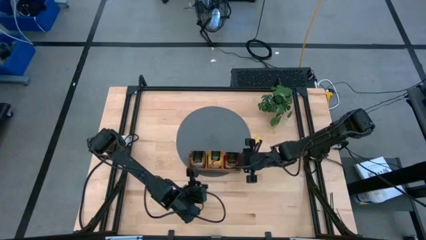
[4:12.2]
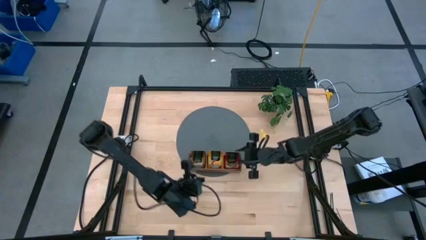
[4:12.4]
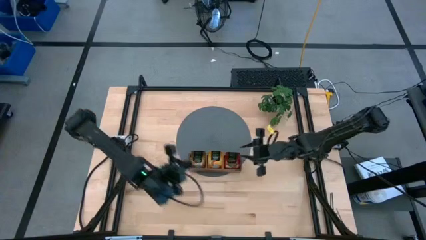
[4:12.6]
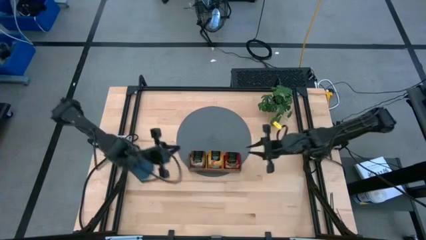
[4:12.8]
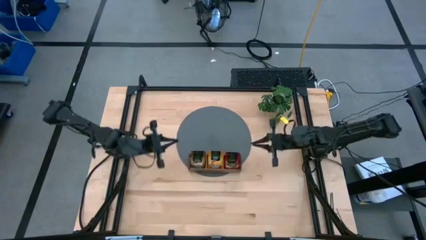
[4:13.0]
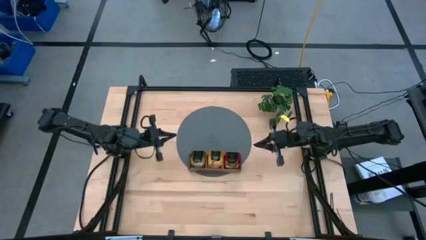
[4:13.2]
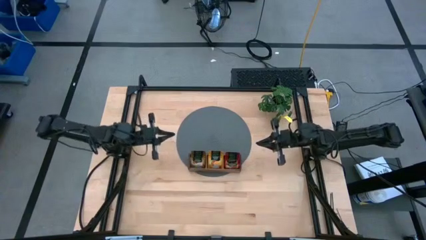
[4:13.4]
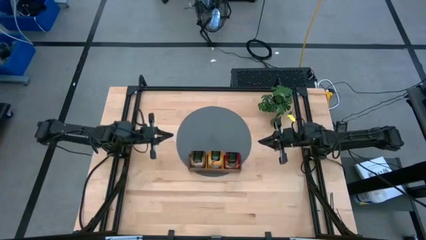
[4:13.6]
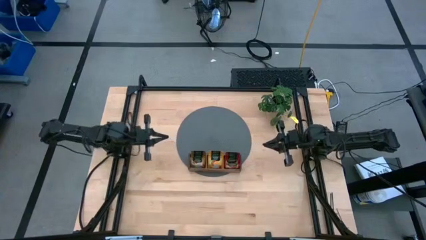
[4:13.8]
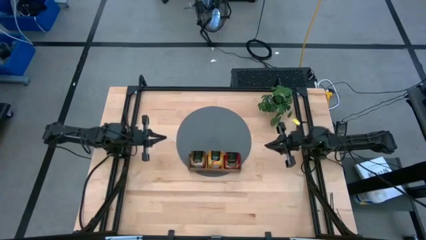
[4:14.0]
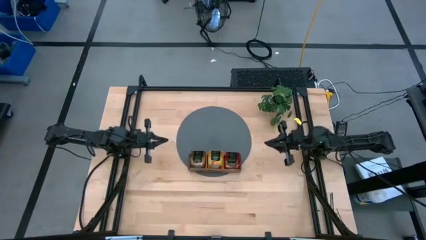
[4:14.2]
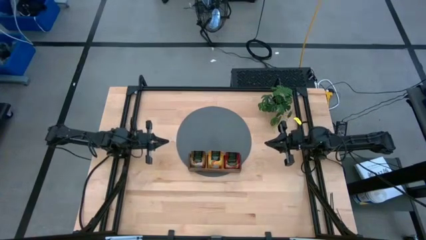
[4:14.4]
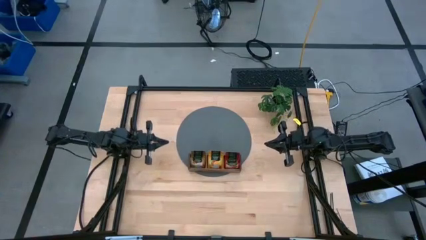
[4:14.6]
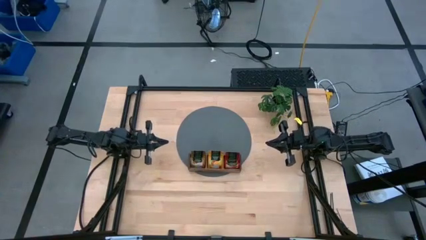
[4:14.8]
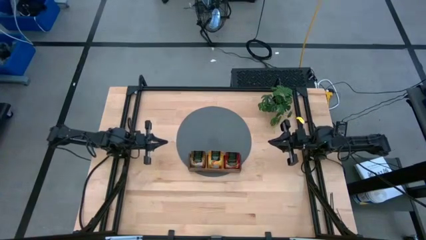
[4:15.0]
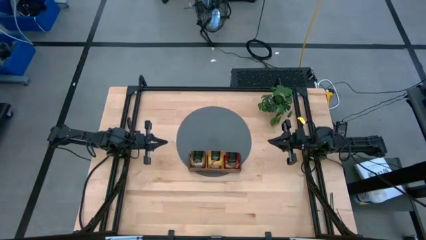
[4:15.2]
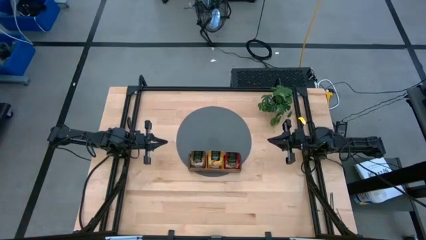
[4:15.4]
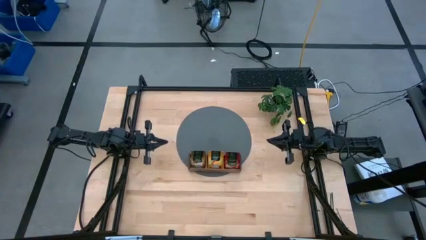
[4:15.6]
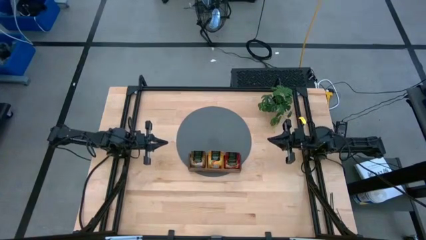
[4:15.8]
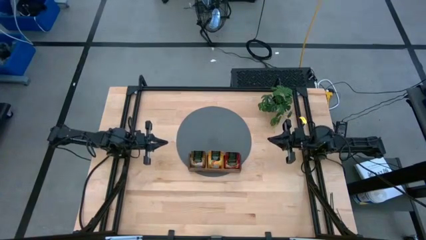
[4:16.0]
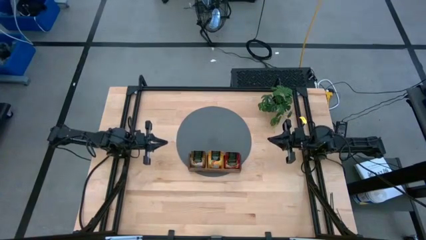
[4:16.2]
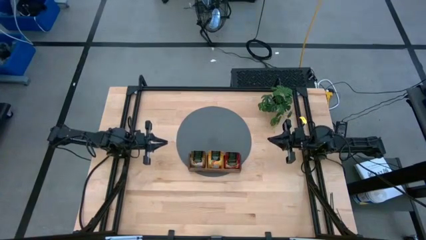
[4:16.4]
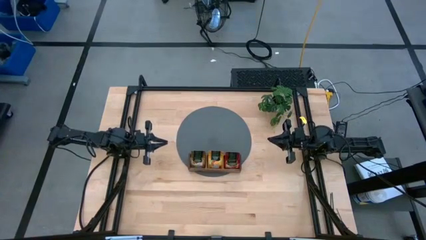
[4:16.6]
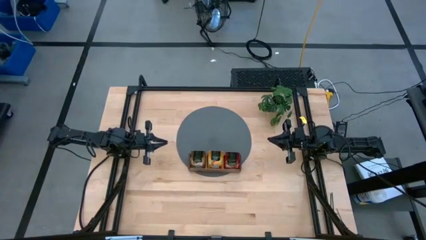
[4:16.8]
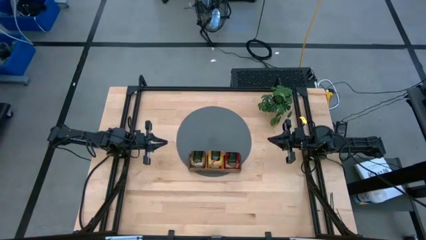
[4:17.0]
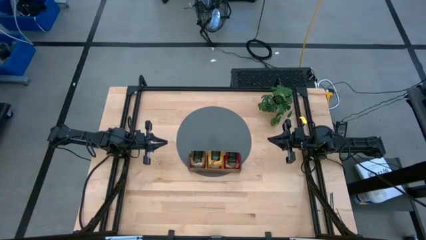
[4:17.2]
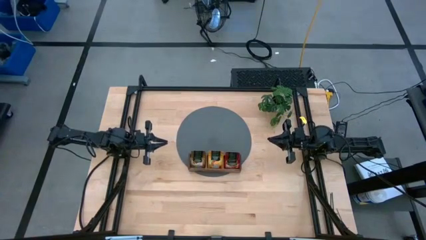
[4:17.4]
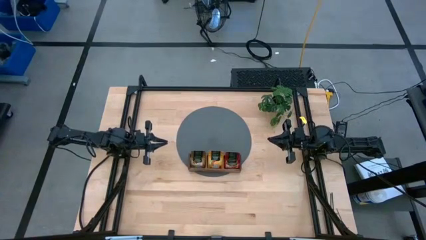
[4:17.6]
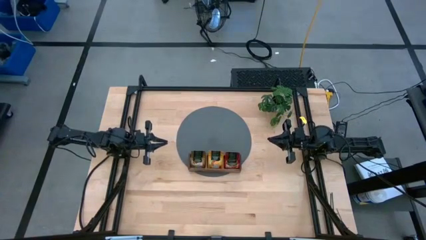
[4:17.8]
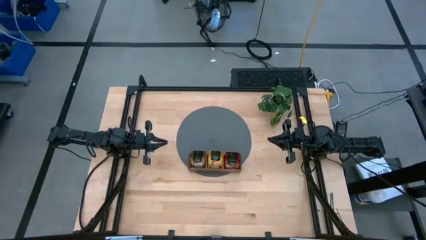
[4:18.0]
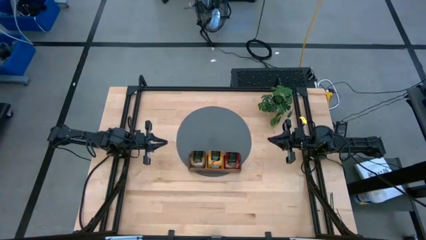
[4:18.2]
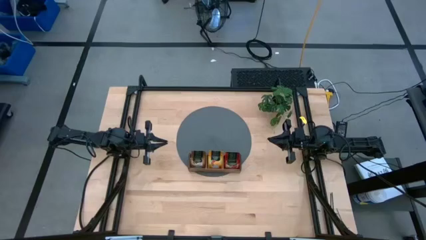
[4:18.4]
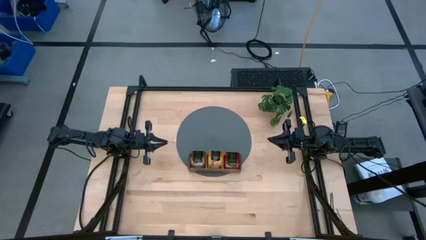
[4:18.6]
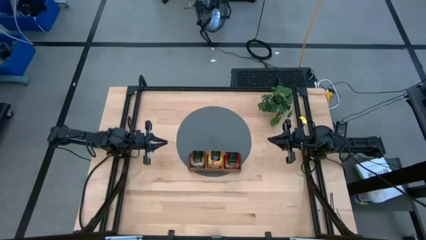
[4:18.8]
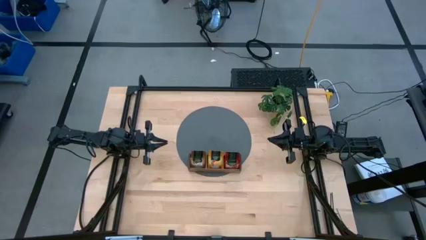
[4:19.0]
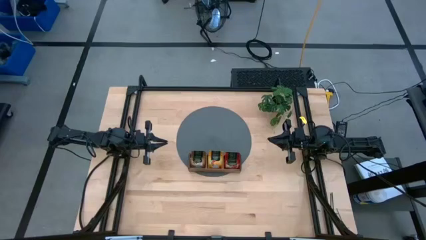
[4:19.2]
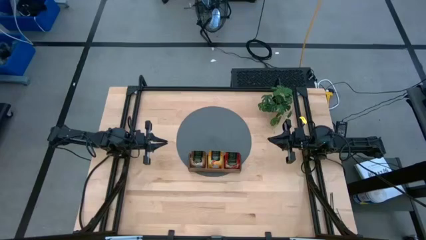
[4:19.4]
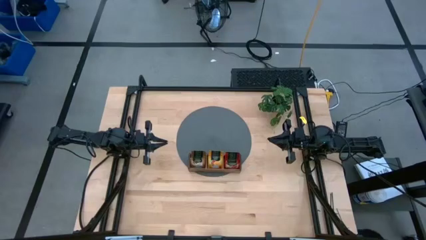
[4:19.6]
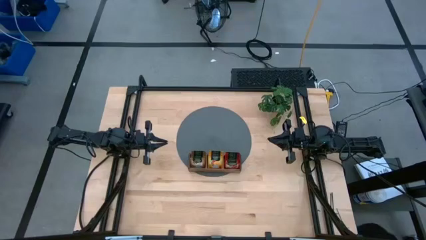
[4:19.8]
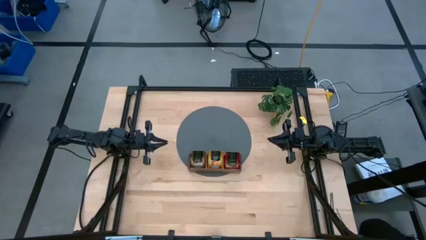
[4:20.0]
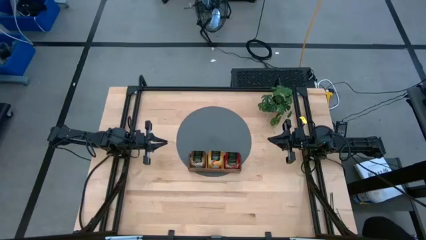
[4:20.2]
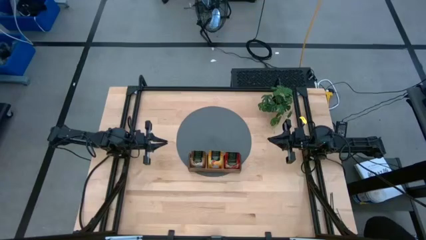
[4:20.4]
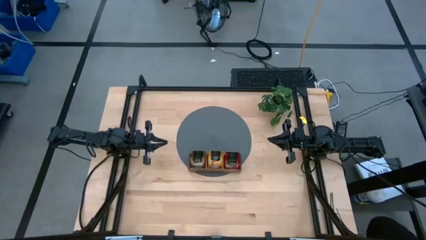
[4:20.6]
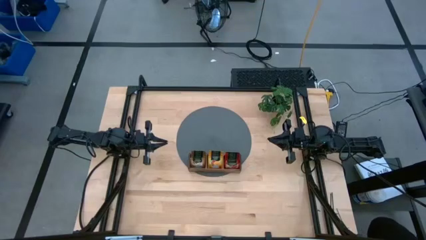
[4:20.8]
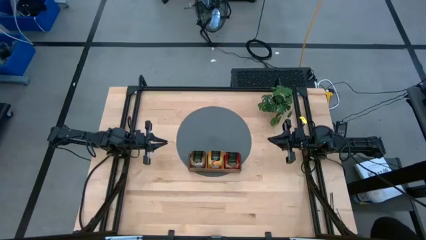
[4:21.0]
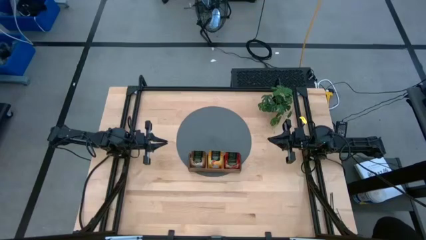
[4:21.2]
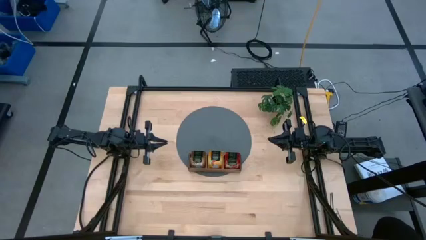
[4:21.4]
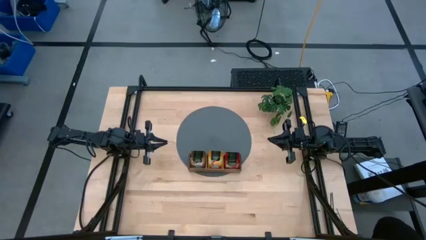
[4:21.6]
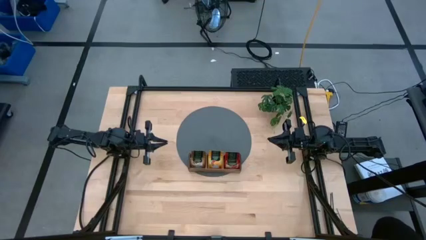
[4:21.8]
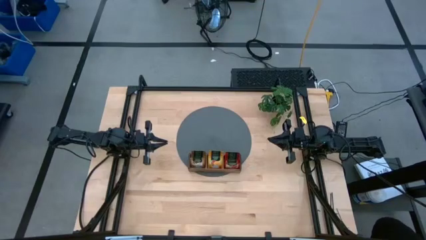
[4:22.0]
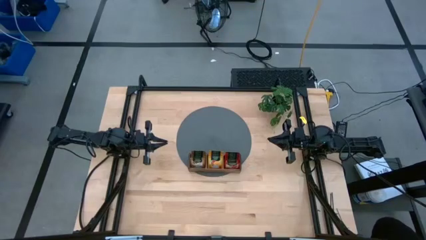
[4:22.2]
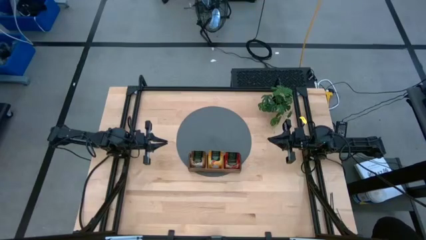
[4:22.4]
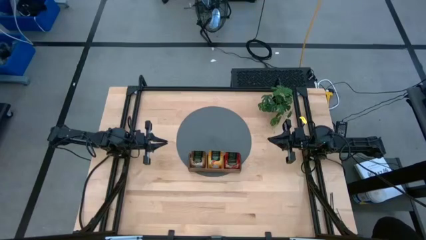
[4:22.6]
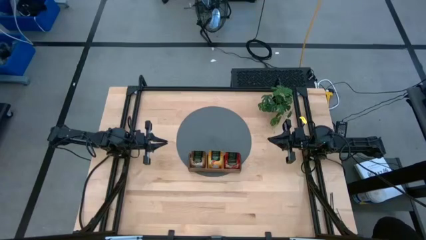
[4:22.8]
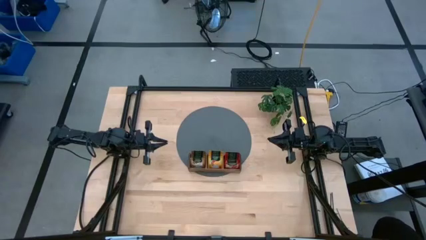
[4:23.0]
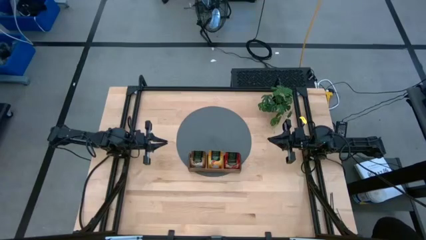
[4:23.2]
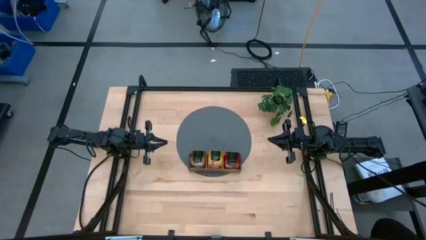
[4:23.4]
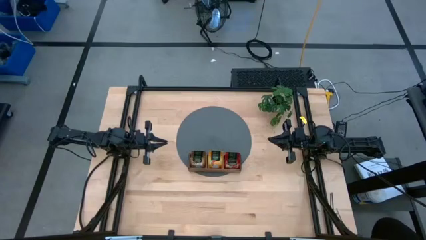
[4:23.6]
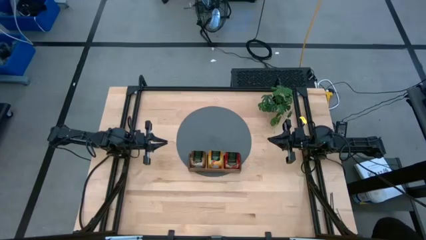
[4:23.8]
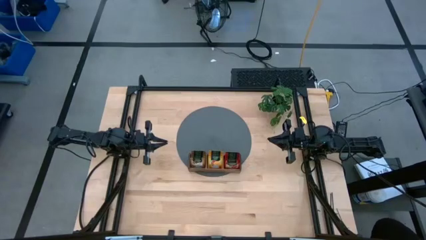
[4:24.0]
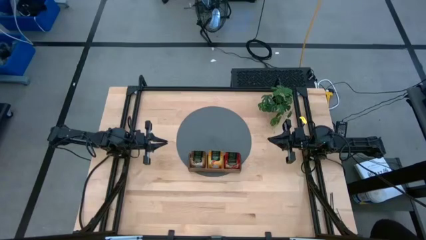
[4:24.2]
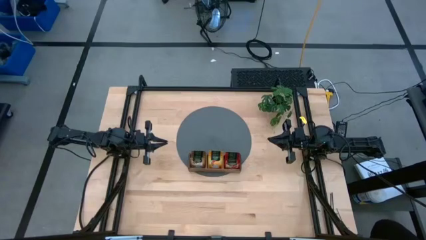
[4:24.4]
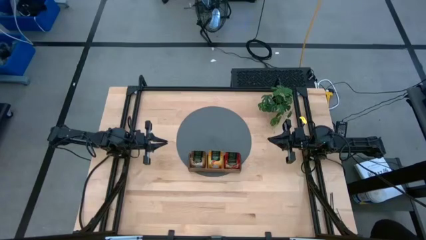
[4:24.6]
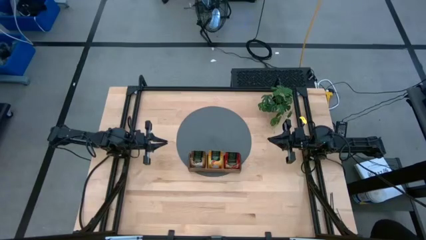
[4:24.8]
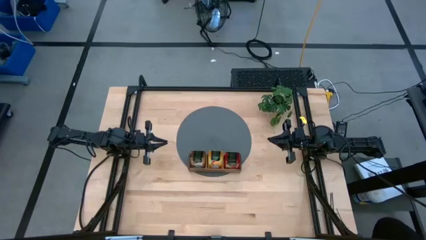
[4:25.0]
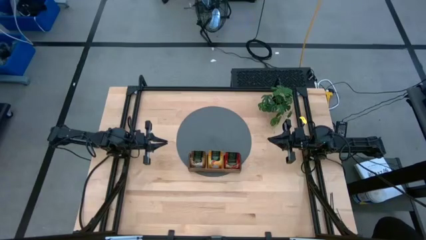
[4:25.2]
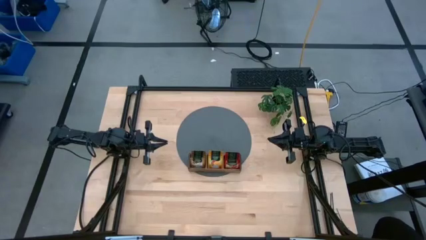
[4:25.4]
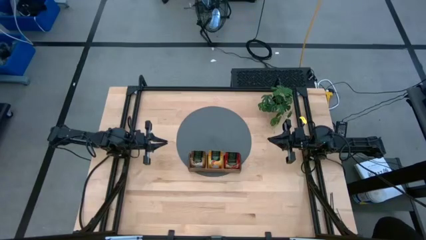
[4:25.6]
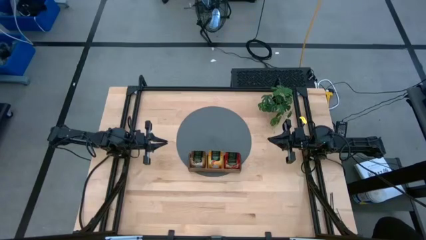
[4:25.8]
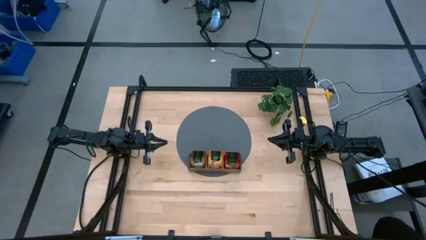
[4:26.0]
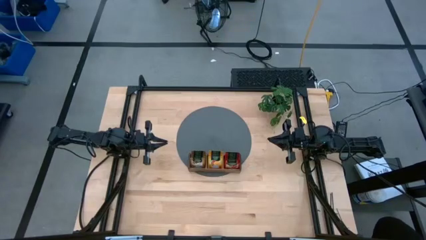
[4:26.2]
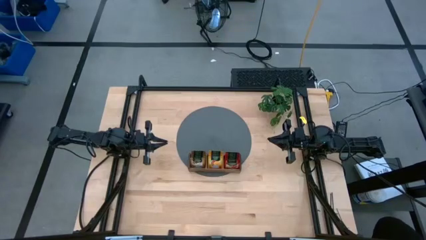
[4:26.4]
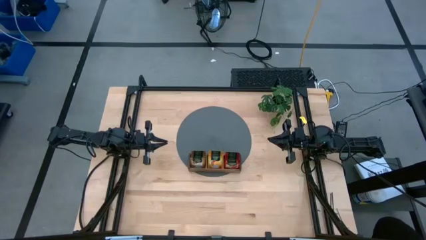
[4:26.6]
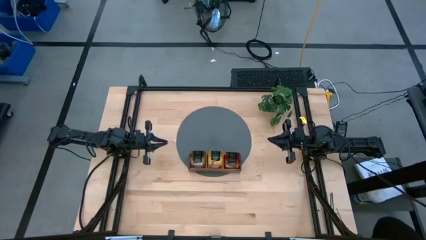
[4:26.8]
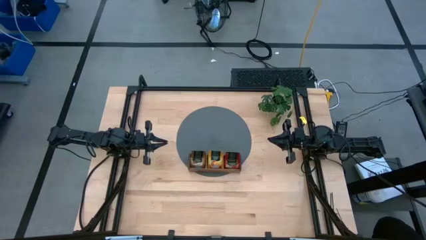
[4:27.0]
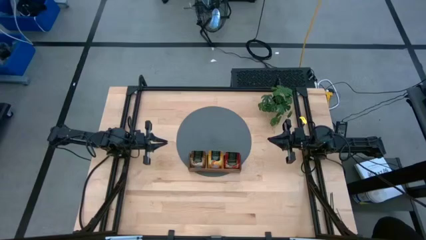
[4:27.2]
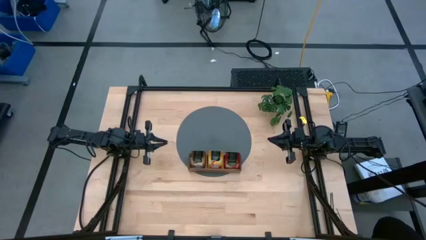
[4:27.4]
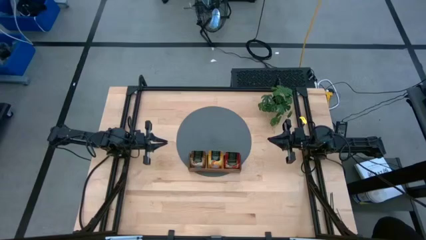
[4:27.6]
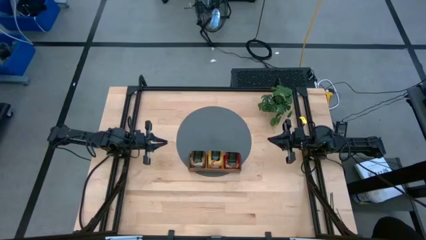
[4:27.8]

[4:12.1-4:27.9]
Task: Pick & Place Tea
Return to Home Position
